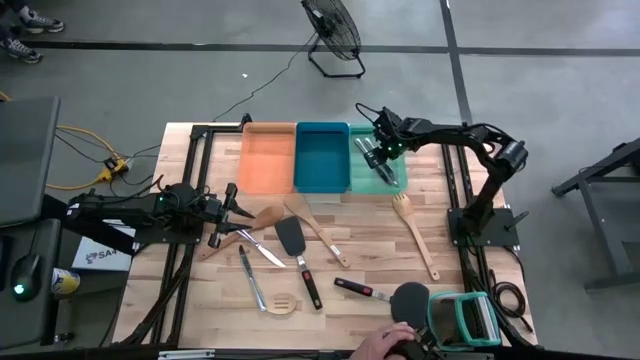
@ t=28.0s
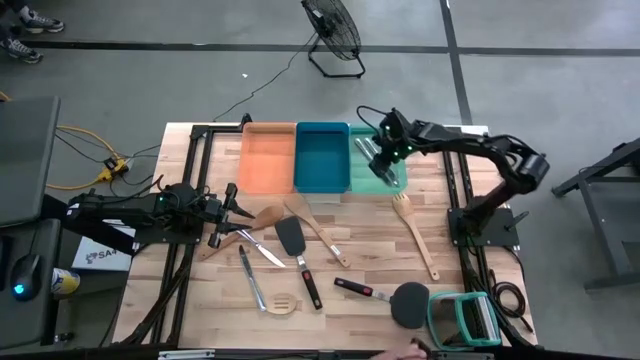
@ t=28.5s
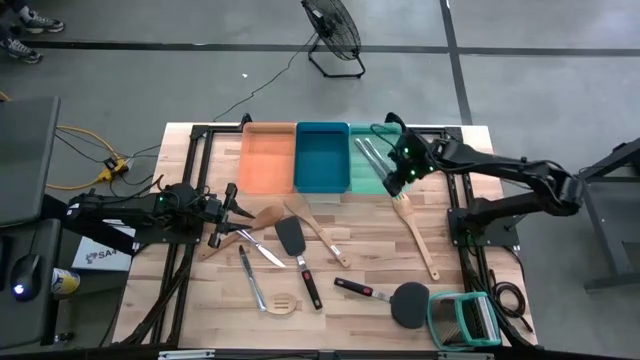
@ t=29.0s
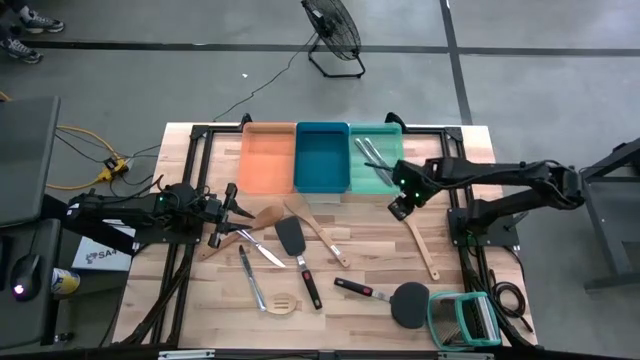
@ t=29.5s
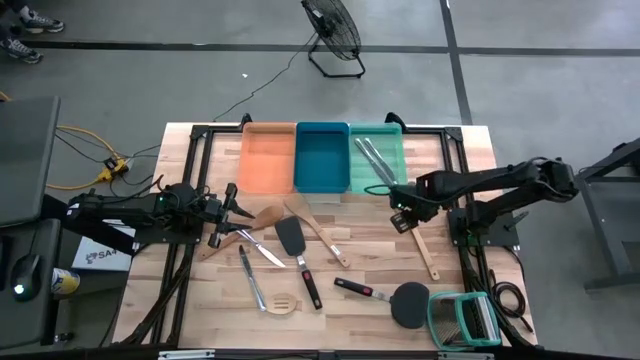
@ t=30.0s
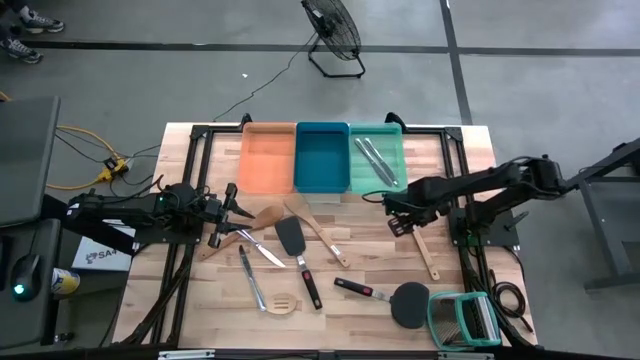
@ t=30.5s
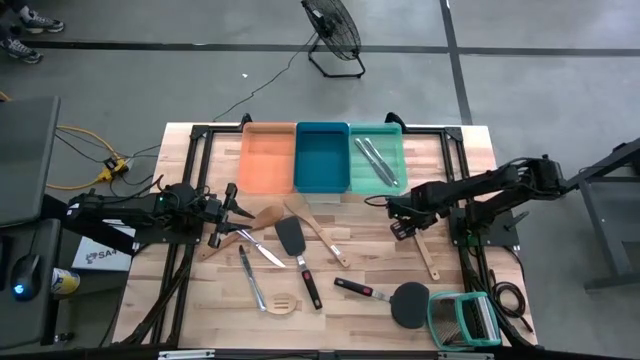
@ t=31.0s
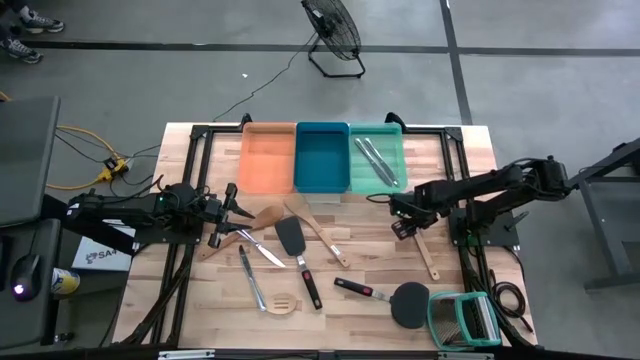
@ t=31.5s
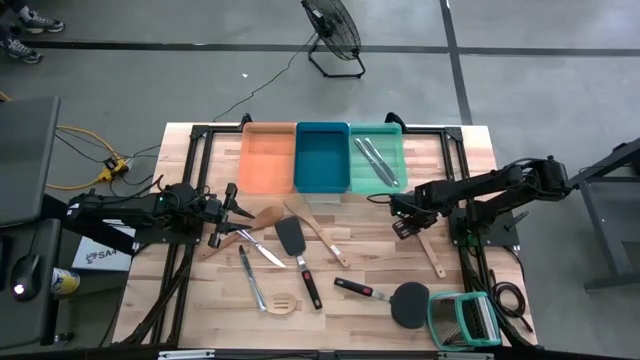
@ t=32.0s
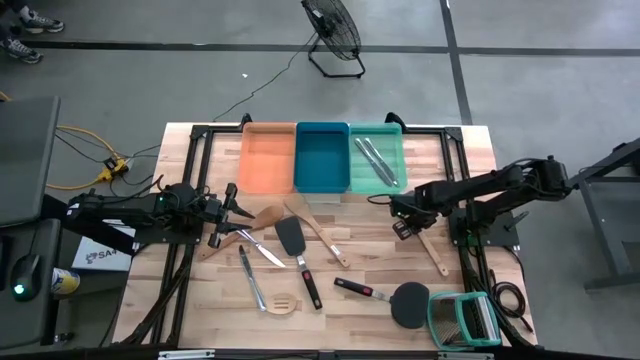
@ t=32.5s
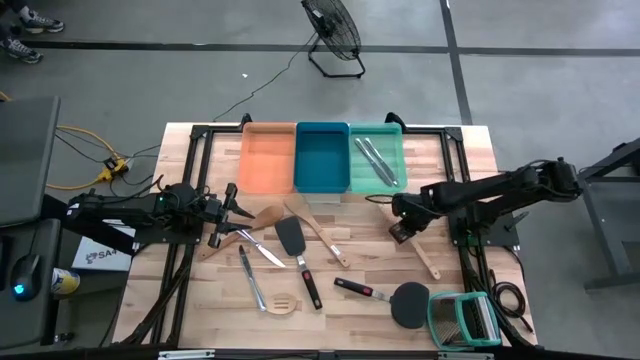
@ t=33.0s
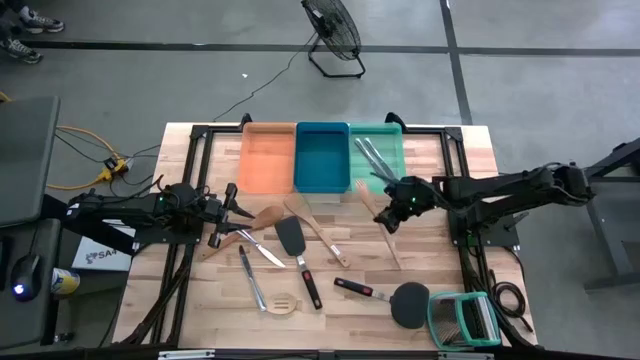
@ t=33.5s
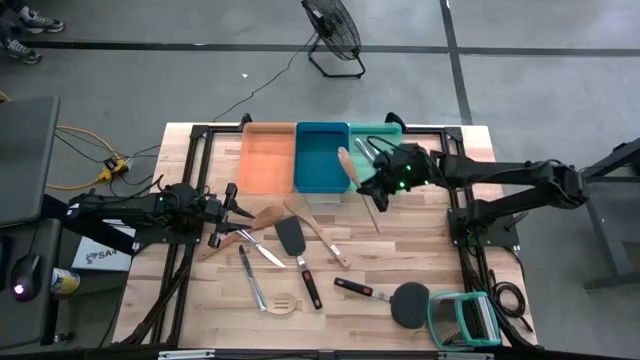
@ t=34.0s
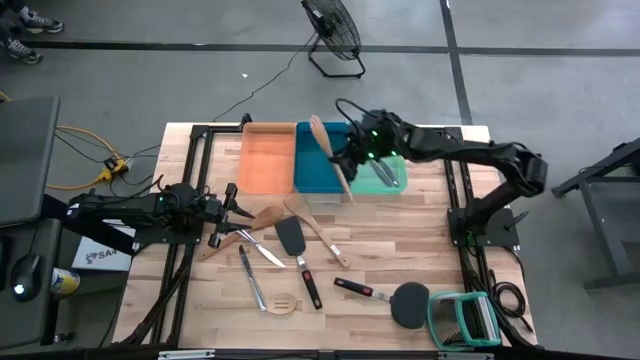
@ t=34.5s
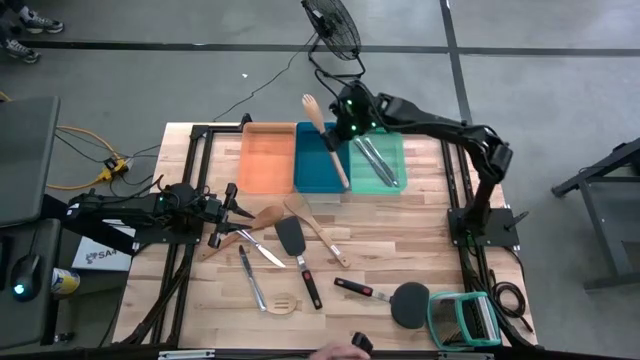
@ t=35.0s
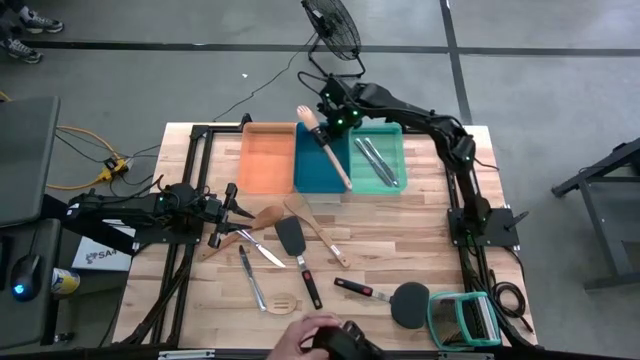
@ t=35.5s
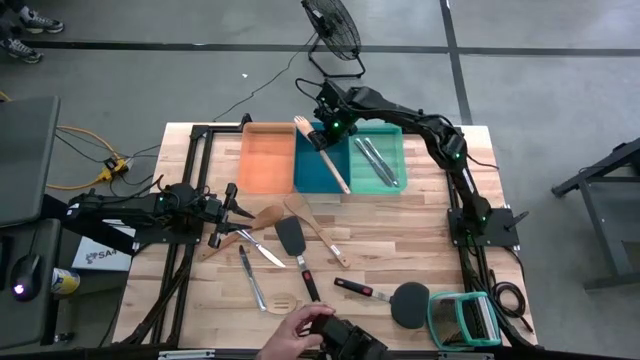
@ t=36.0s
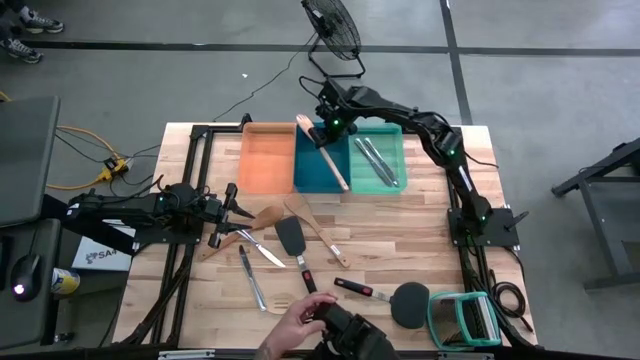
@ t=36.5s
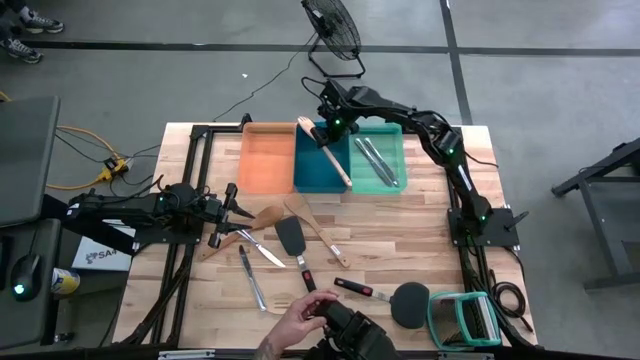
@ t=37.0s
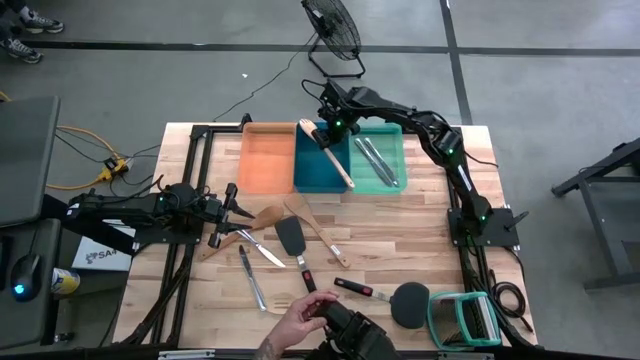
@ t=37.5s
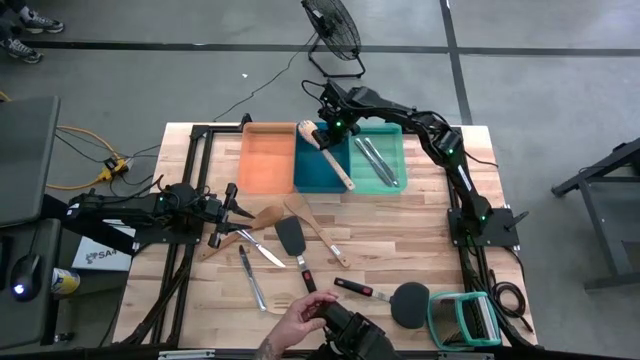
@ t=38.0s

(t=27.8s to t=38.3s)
Task: Pick & Place Kitchen Items
Put the brown wooden fork into the blue bin

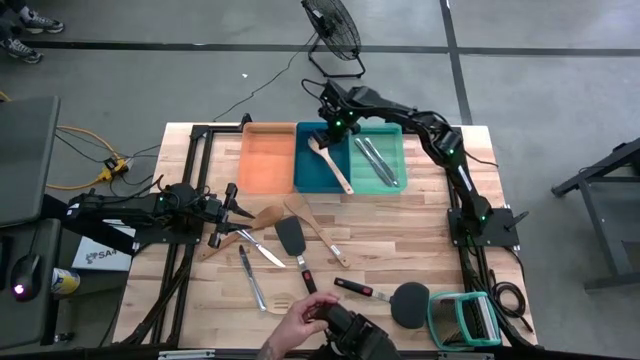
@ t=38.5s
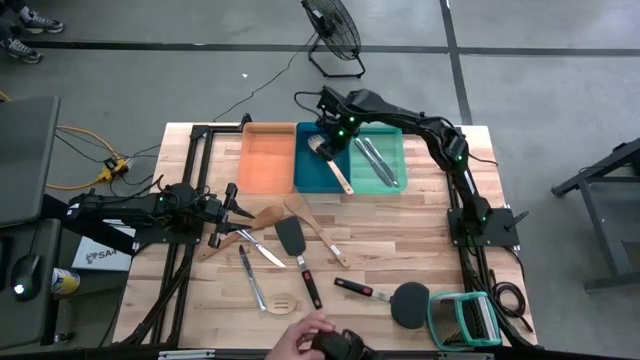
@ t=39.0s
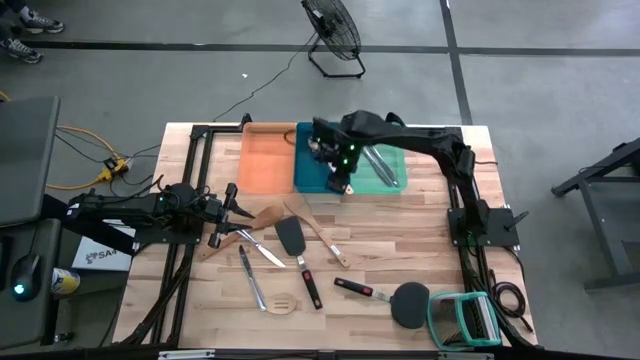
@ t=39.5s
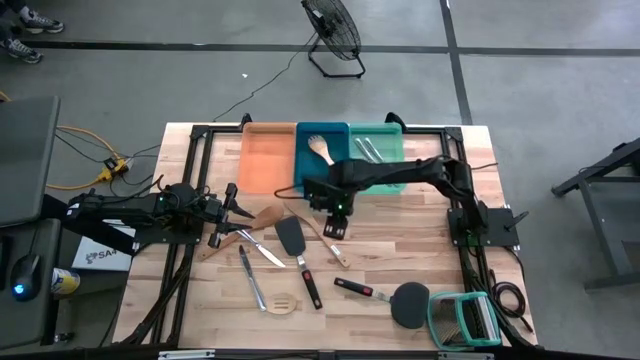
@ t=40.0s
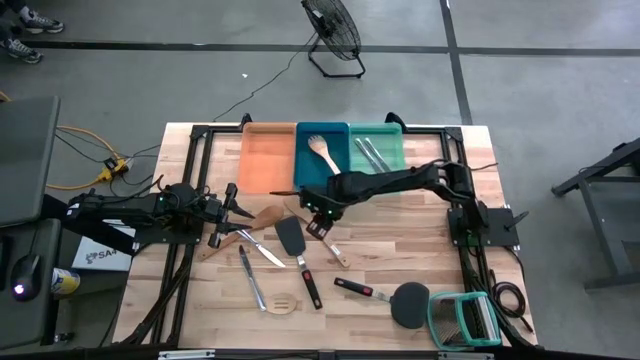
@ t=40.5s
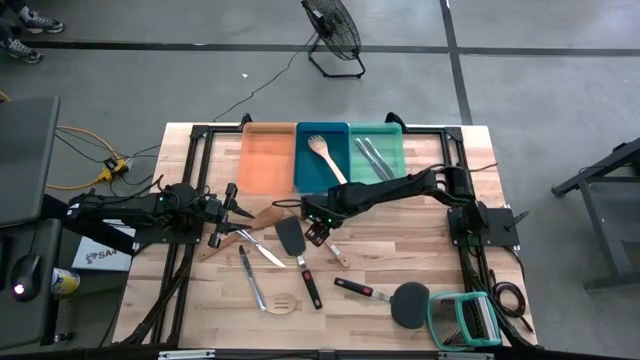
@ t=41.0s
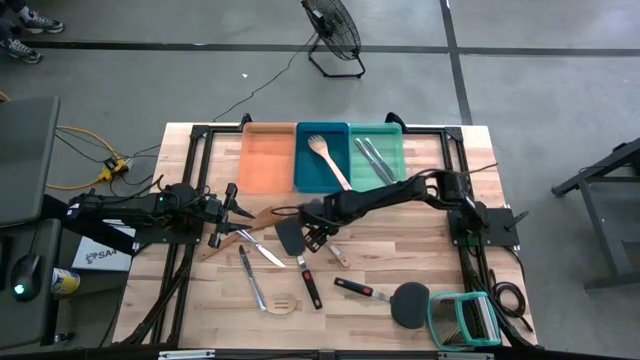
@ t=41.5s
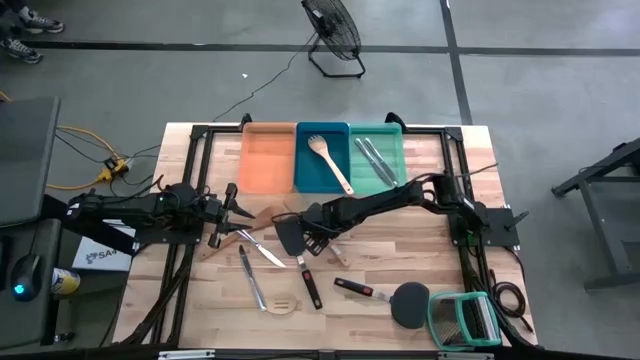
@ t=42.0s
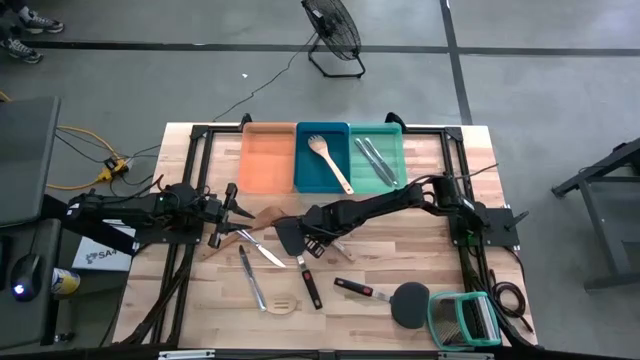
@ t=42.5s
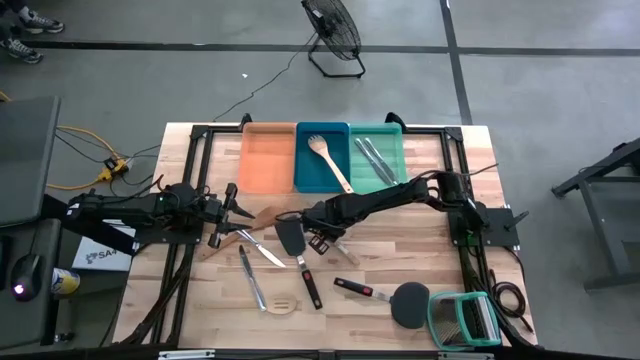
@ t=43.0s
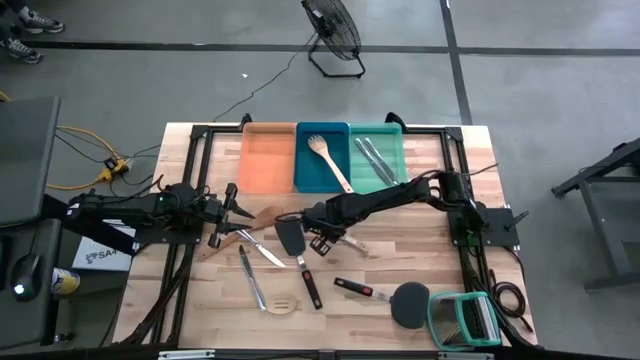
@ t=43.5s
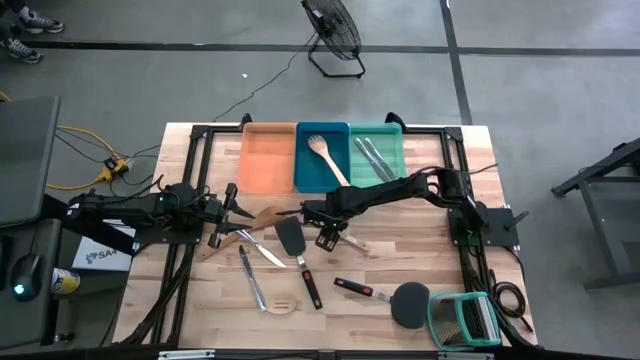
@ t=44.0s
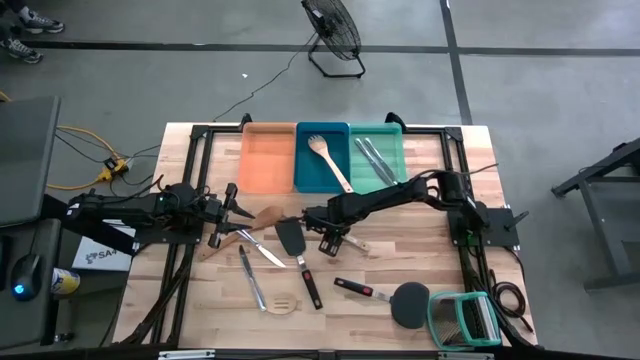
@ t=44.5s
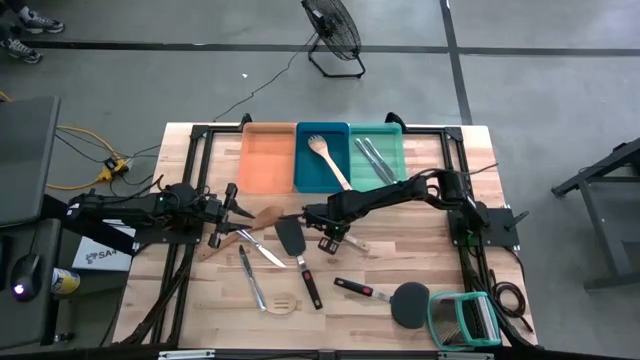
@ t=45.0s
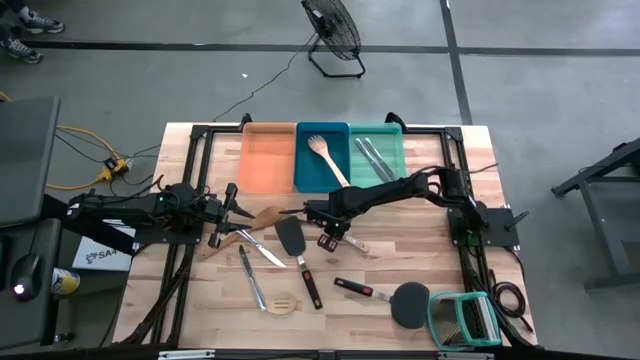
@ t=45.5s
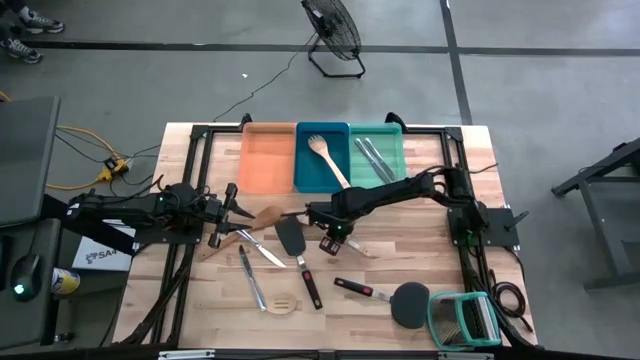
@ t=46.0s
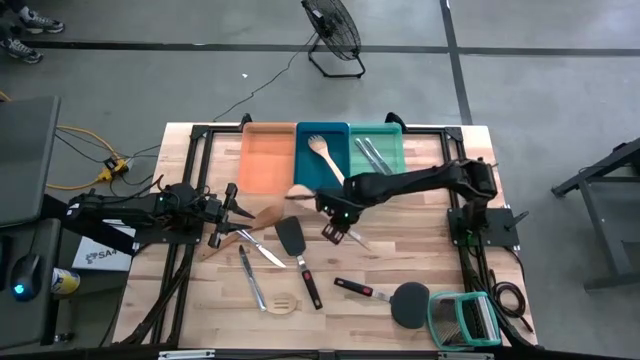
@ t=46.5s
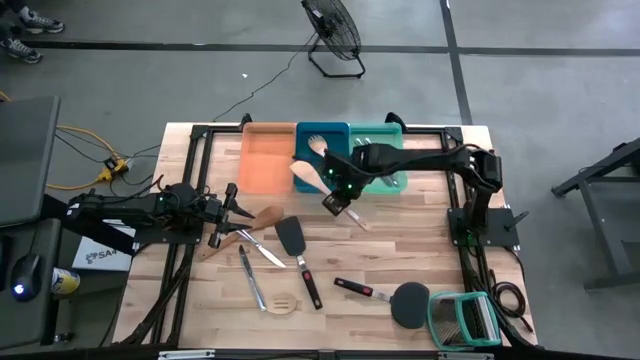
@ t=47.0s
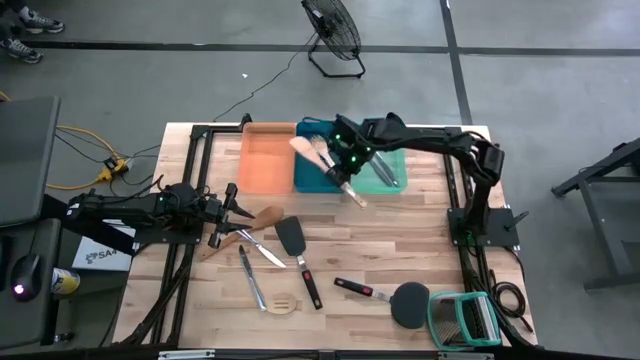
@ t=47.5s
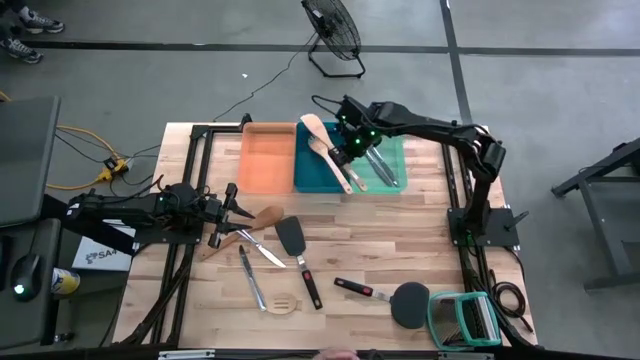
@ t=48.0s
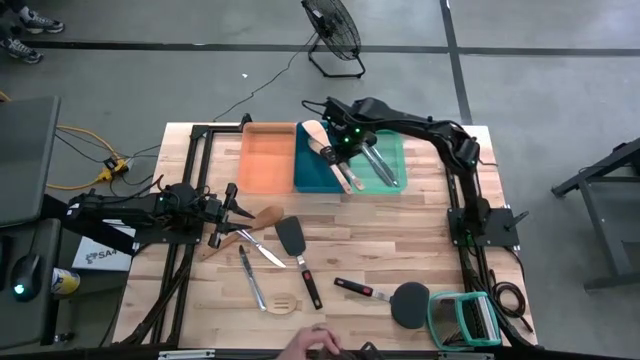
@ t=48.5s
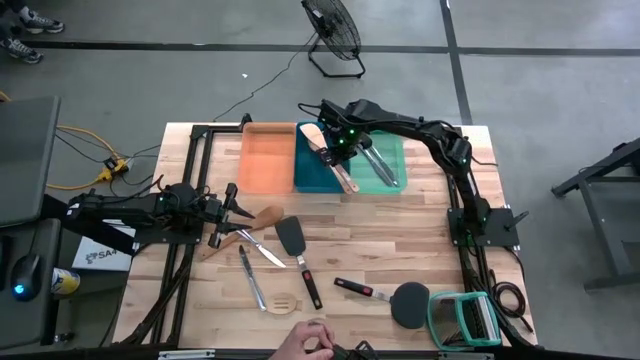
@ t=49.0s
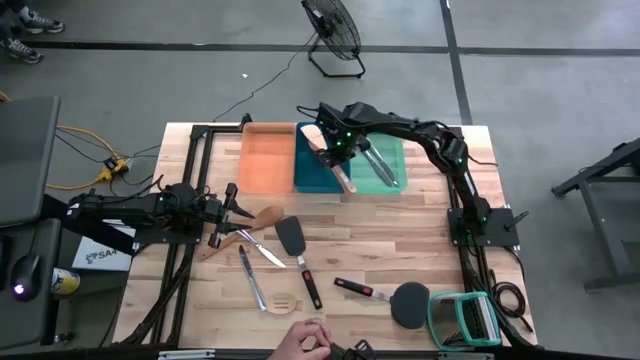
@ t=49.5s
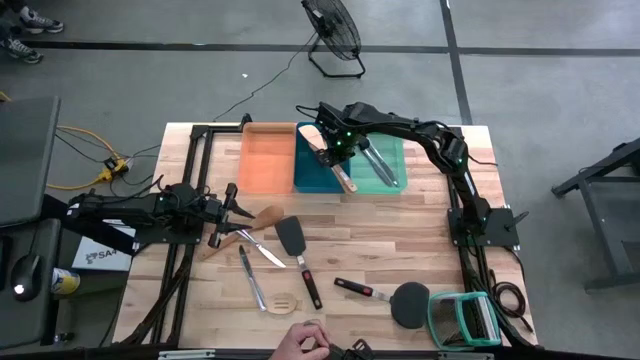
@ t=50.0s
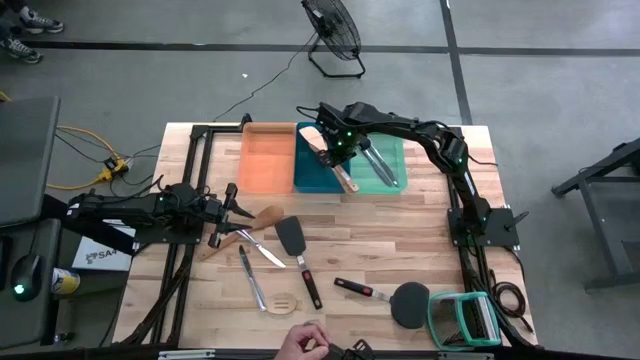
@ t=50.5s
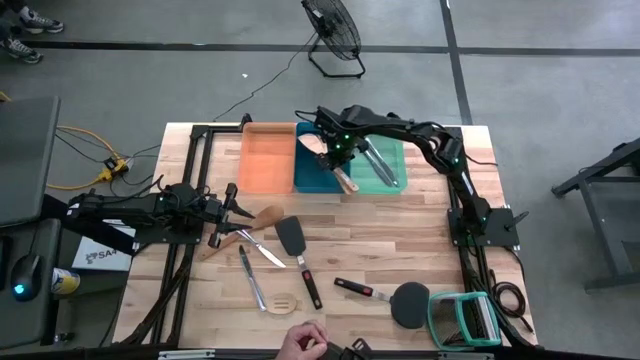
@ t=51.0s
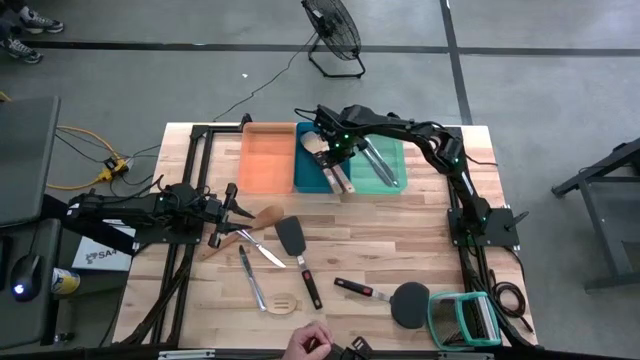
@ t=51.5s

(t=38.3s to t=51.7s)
Put the brown wooden spatula into the blue bin
